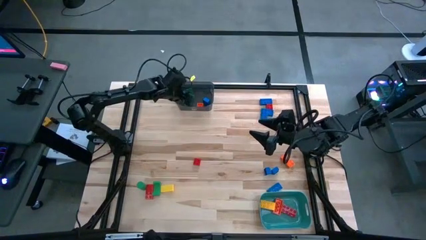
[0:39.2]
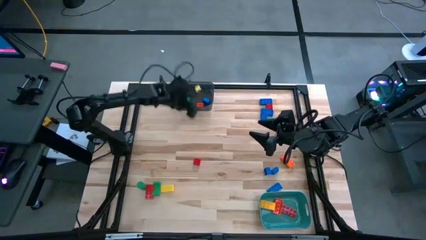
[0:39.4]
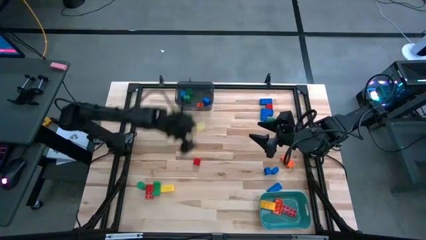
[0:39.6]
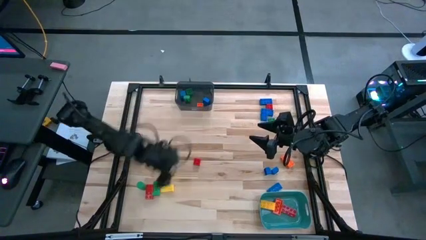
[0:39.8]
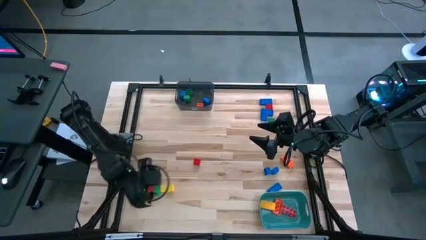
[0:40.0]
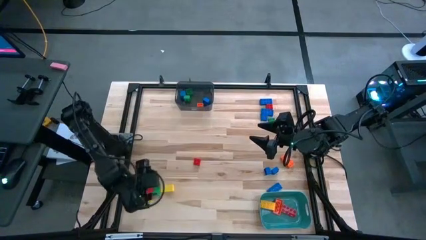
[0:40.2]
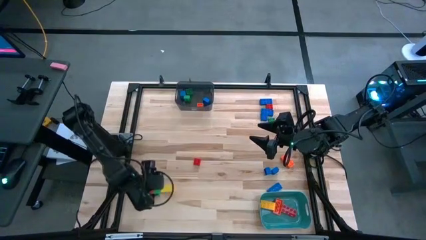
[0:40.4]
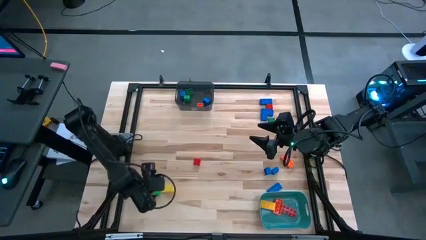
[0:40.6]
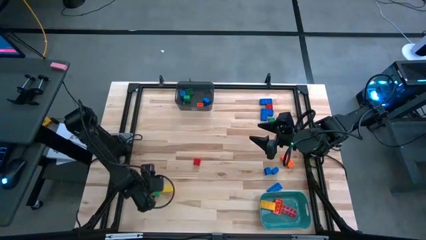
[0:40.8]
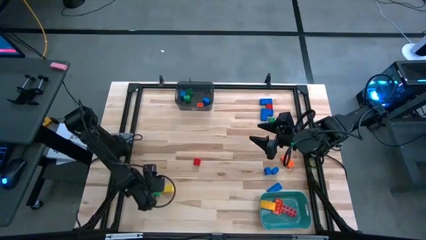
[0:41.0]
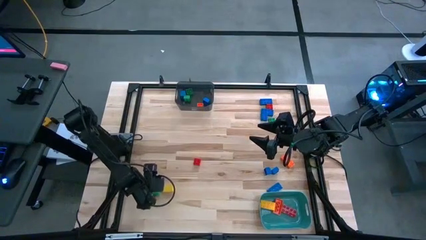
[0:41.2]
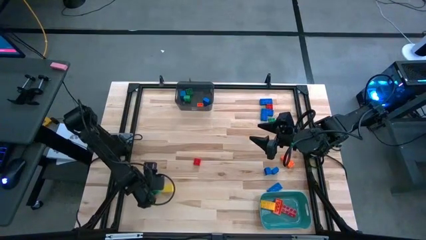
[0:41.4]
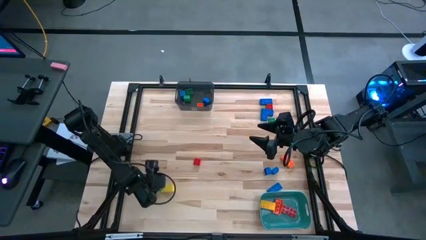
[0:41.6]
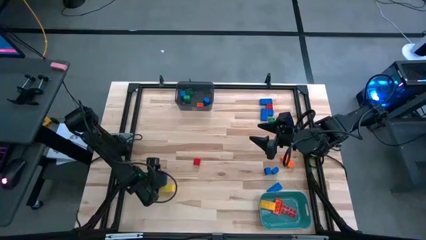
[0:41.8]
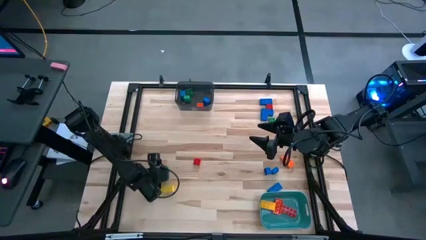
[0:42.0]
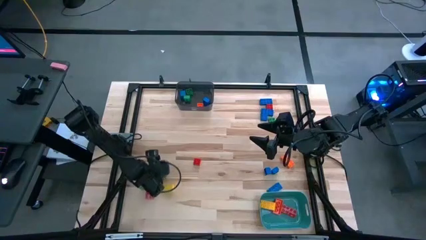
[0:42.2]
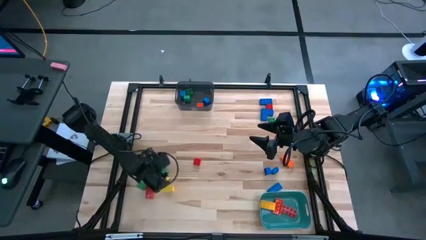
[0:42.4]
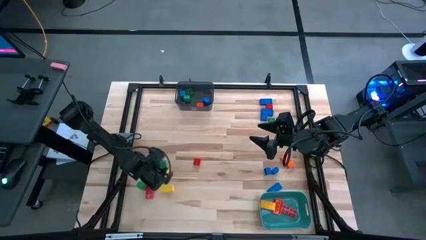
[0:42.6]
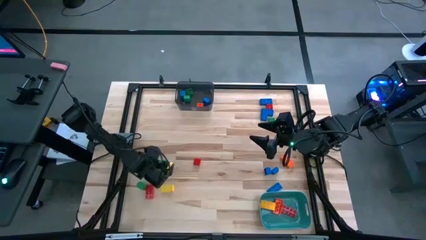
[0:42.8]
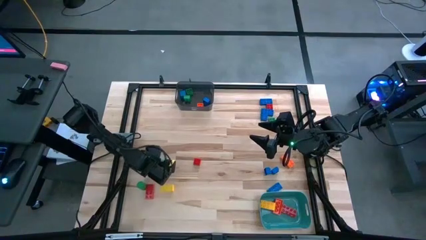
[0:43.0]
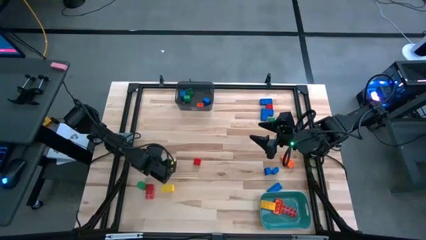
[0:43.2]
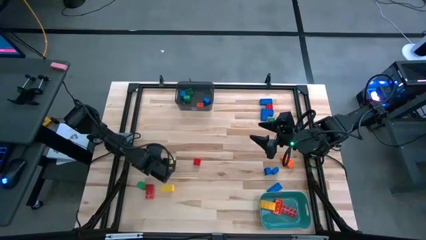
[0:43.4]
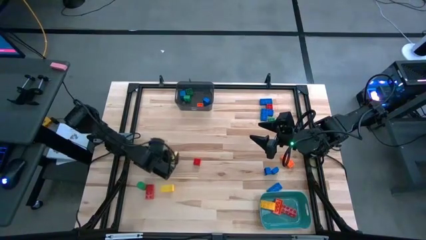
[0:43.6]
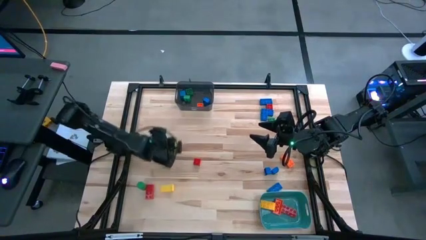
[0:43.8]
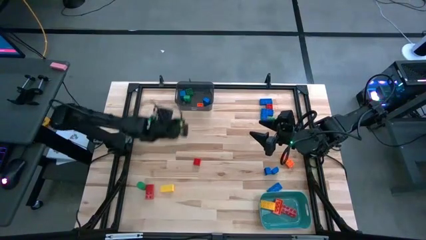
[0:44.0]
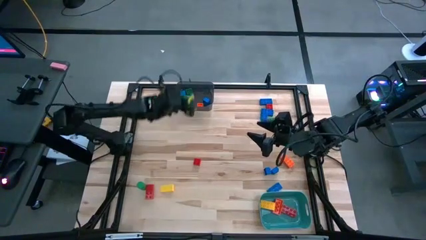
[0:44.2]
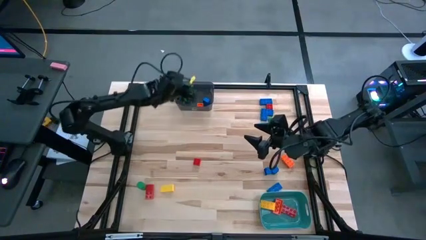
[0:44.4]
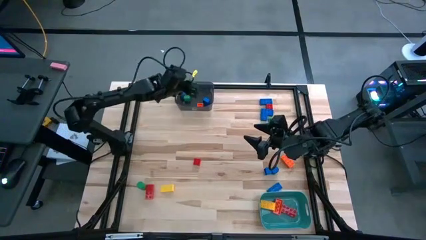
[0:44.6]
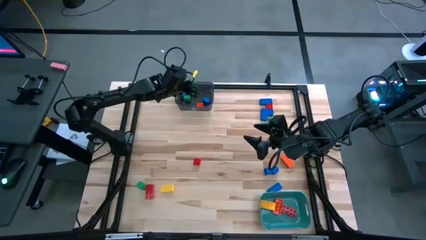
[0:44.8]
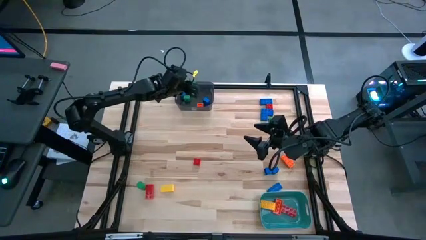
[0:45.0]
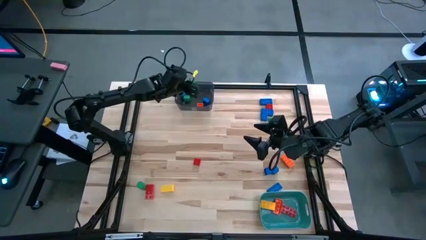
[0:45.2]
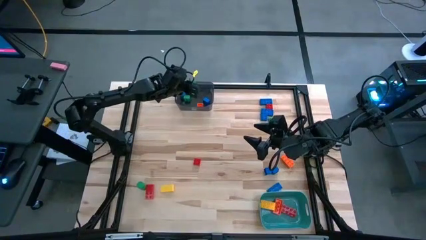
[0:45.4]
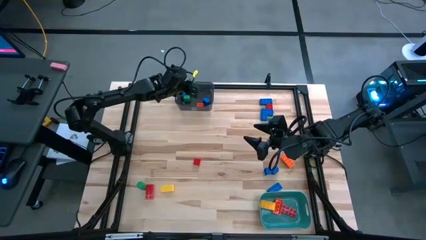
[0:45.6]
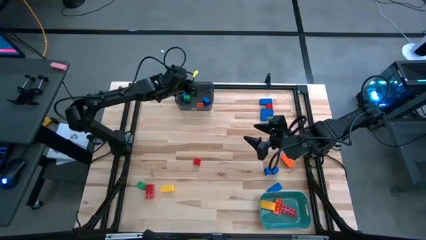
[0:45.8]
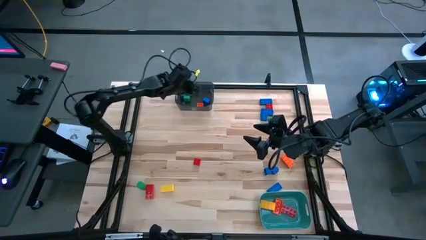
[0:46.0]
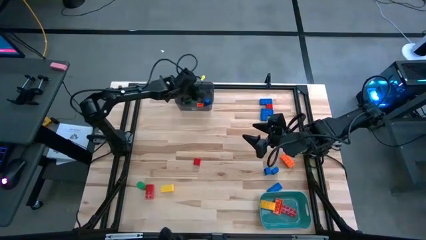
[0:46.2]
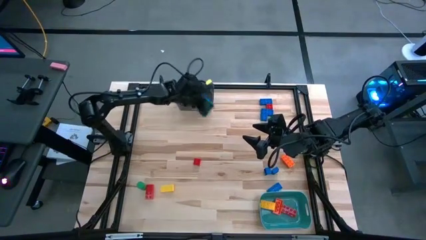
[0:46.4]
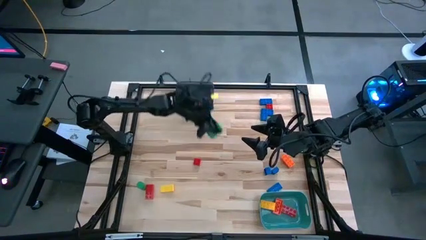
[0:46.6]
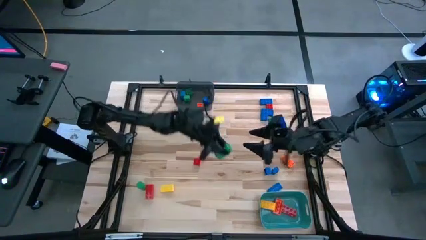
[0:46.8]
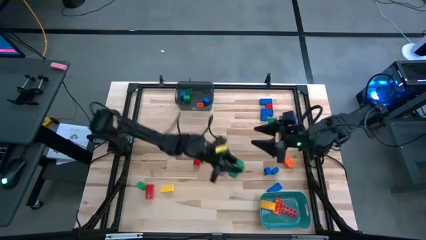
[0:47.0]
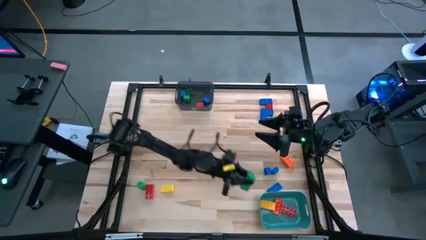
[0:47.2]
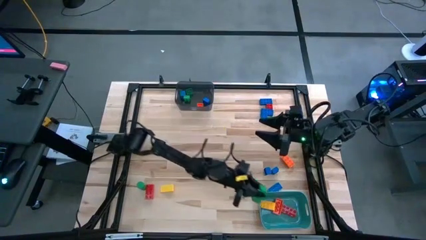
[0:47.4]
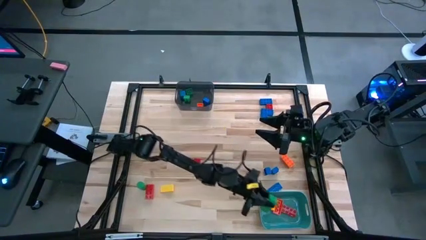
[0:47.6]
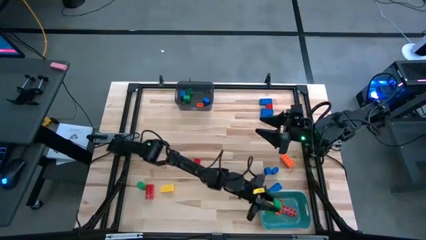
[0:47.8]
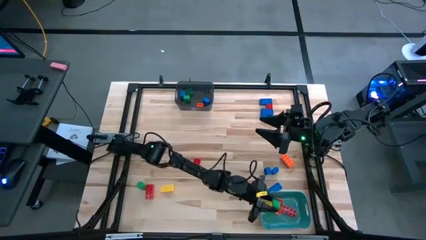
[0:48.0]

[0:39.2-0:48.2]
Task: Sort blocks by size
Put the green arch block into the green bin

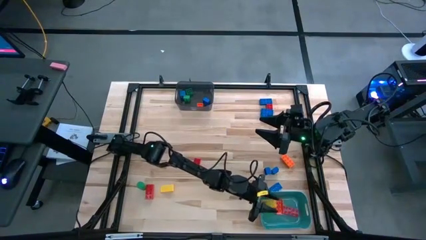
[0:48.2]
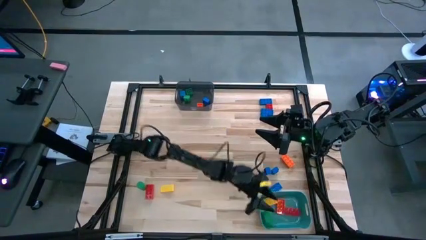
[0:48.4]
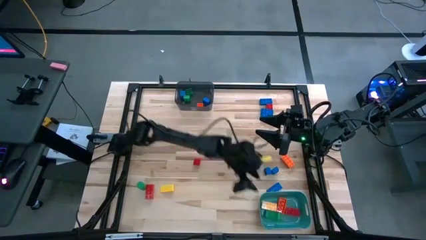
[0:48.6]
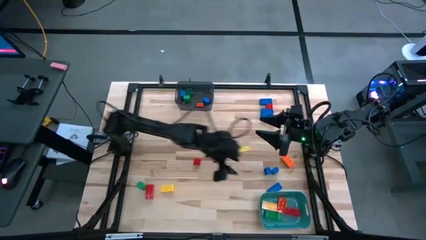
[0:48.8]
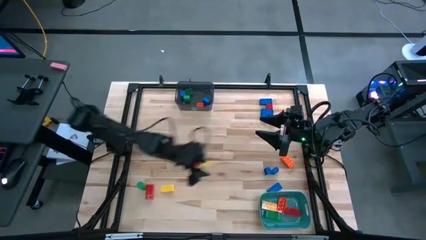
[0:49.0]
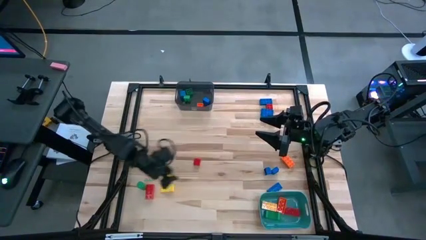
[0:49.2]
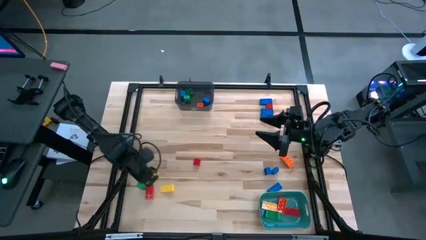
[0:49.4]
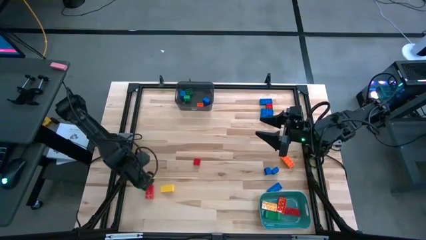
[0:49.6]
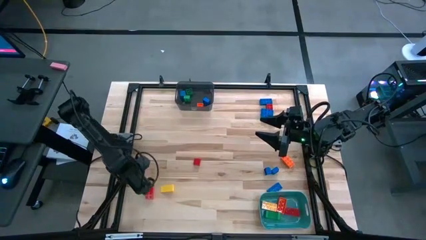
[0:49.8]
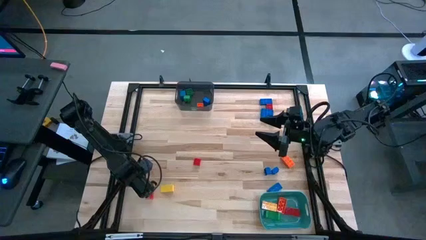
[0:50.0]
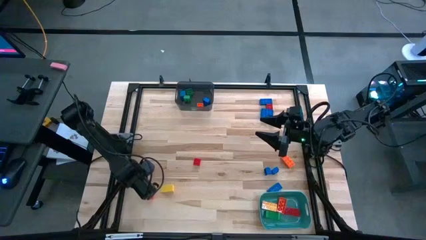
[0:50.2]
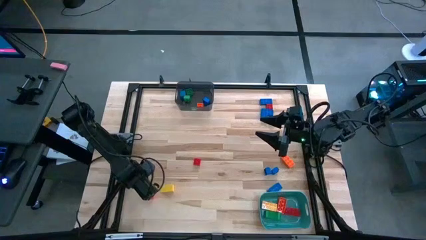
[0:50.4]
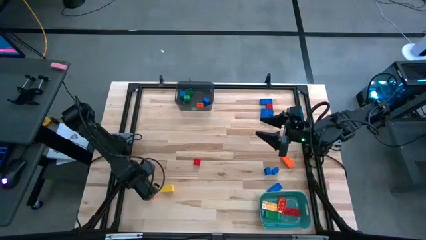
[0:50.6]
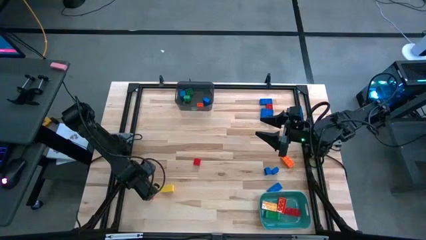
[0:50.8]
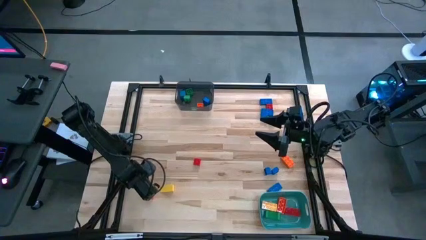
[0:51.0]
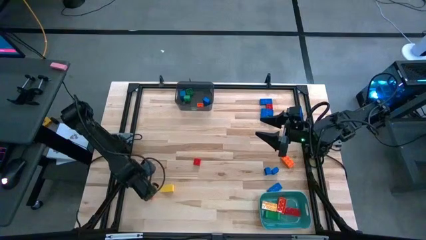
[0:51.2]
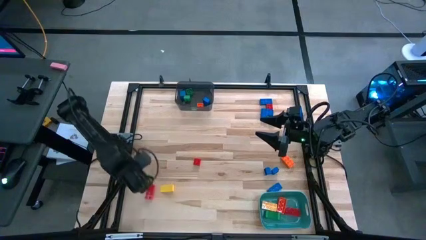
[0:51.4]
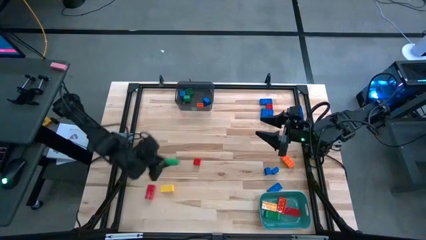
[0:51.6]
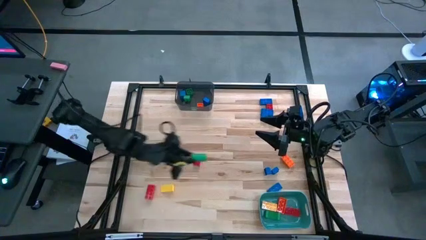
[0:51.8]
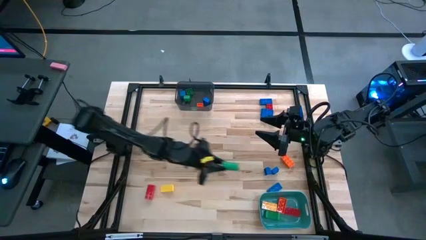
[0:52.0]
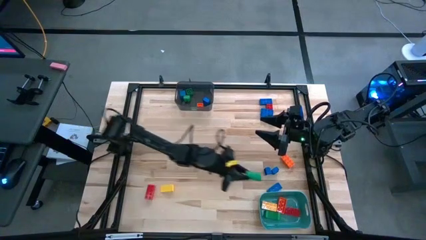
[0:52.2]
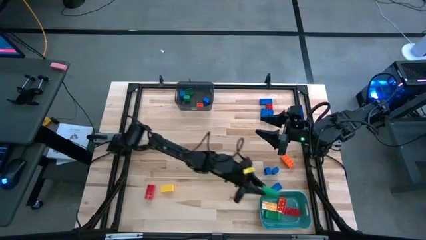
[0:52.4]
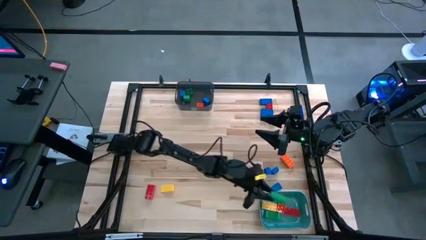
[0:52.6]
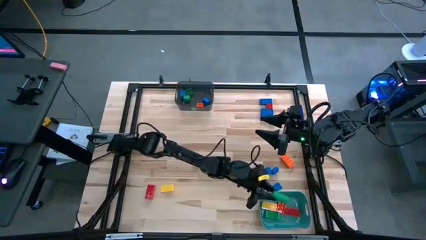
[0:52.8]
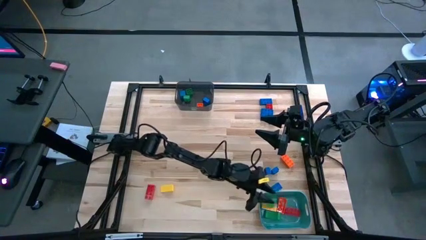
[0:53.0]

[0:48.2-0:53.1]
Put the green cylindrical block into the green bin

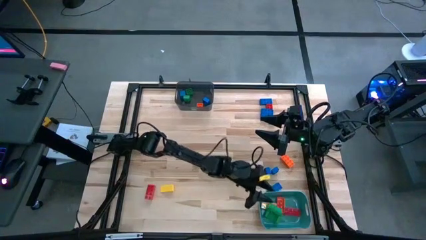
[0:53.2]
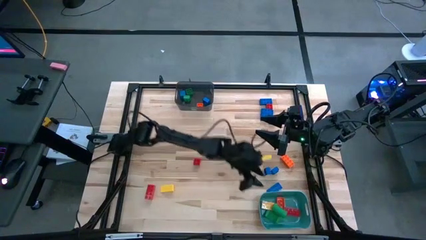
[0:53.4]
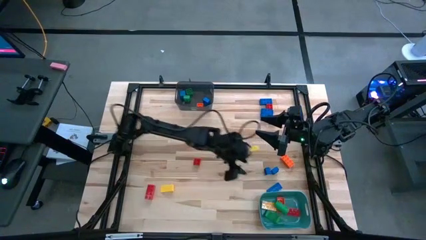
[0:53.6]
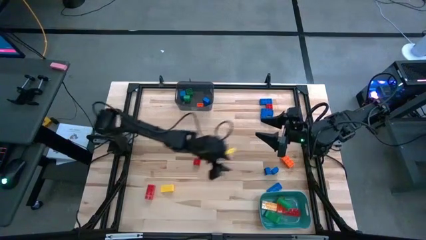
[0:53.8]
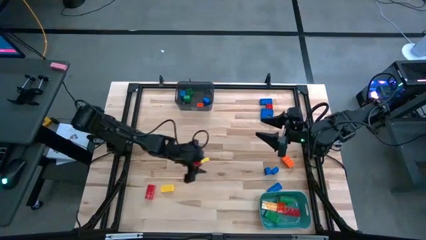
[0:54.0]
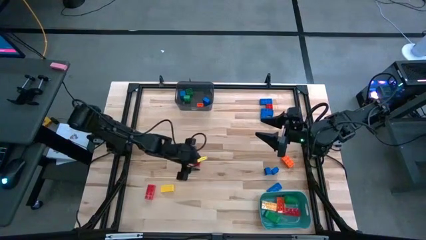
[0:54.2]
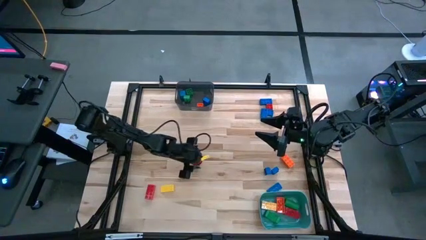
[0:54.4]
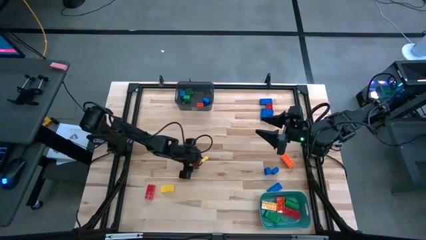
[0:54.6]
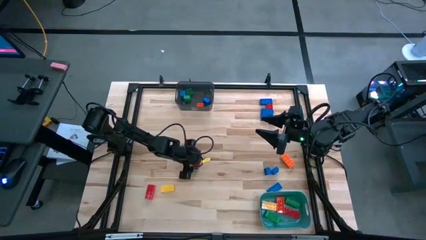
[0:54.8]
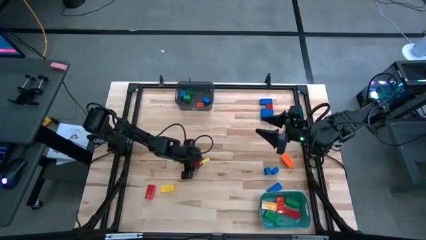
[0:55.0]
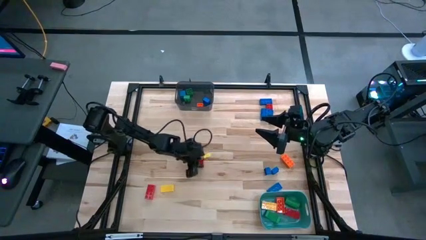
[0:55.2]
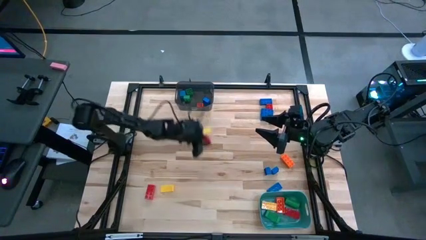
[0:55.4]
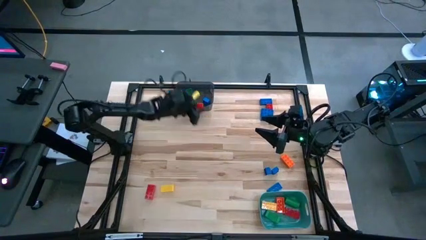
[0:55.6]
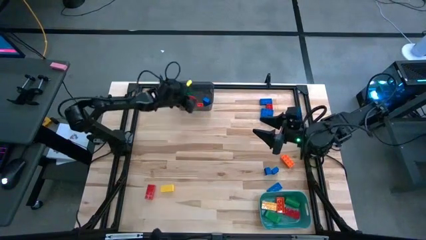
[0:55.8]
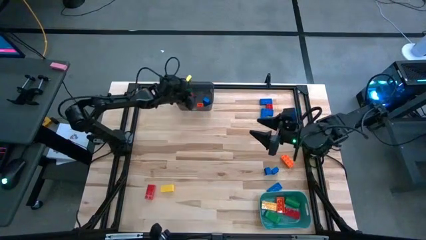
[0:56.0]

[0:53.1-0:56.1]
Put the red game piece into the black bin
